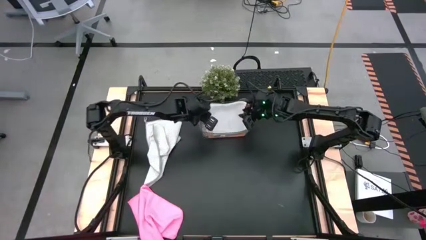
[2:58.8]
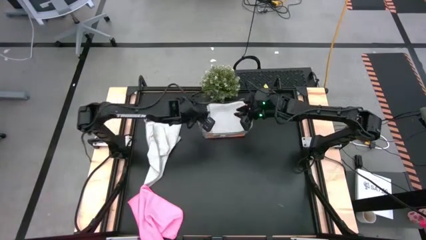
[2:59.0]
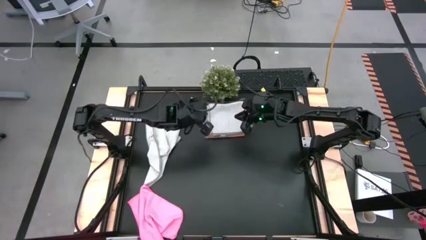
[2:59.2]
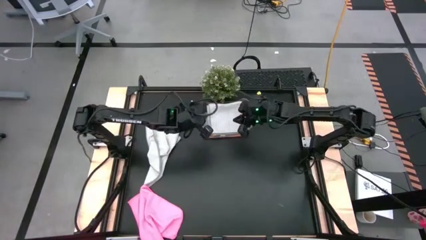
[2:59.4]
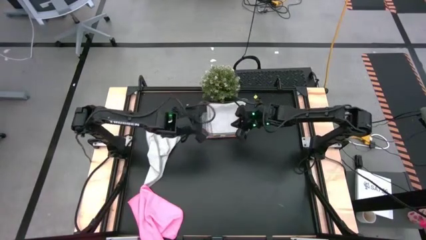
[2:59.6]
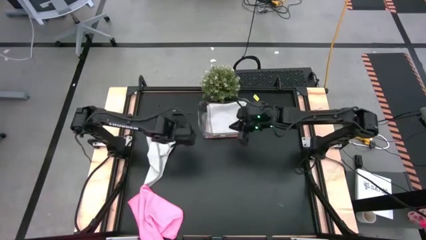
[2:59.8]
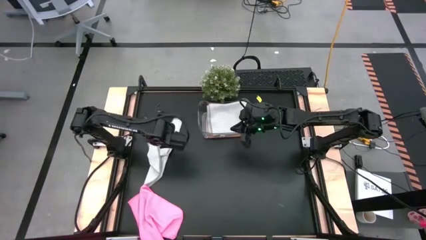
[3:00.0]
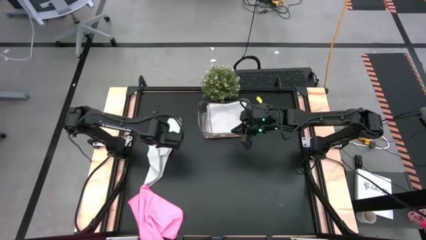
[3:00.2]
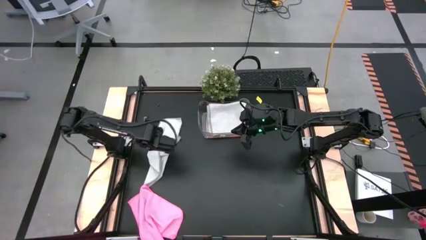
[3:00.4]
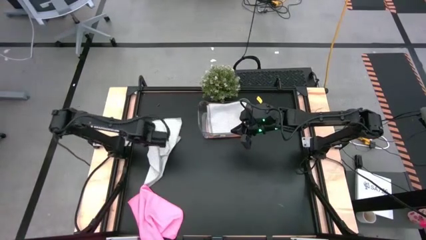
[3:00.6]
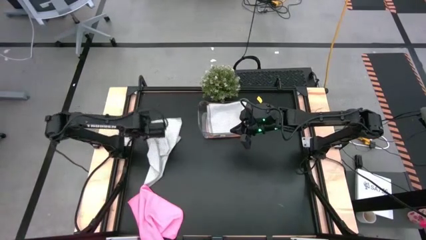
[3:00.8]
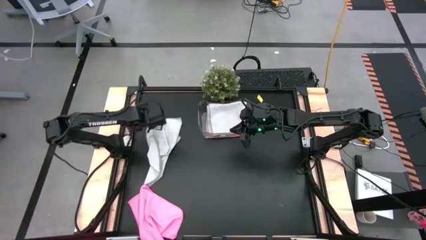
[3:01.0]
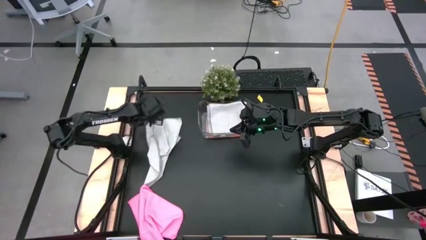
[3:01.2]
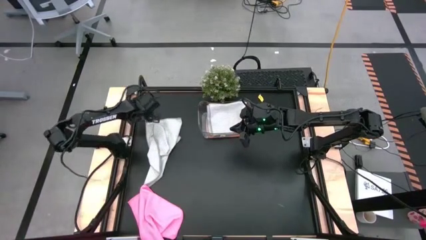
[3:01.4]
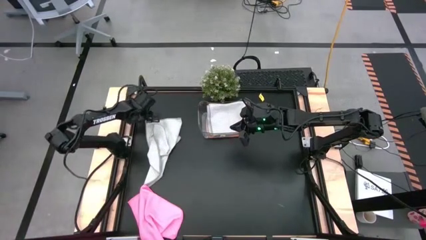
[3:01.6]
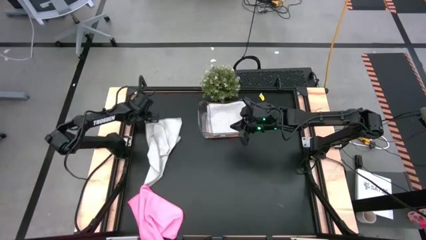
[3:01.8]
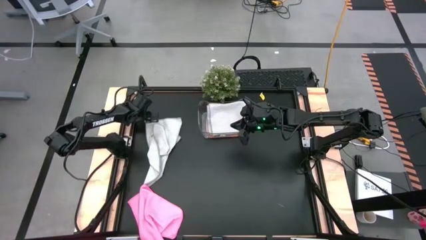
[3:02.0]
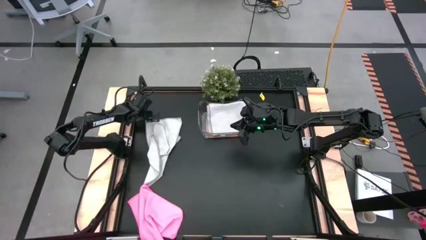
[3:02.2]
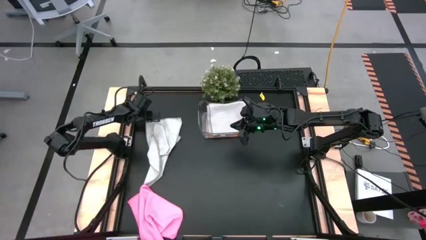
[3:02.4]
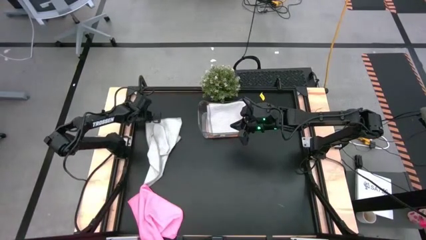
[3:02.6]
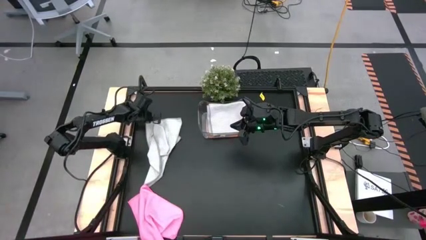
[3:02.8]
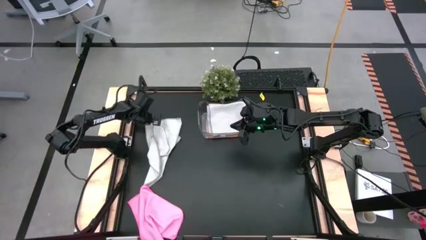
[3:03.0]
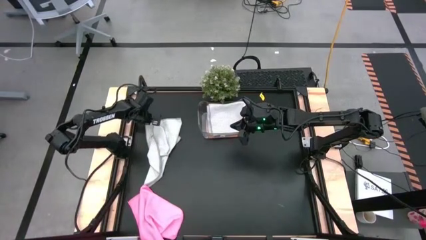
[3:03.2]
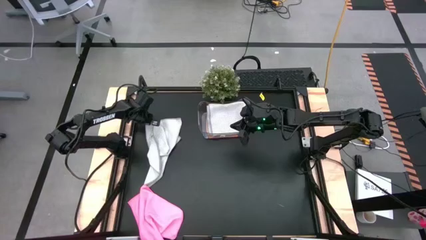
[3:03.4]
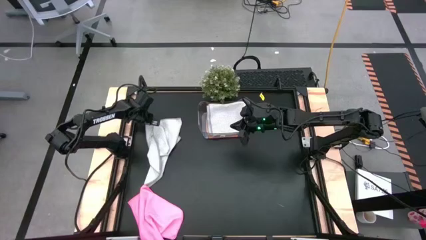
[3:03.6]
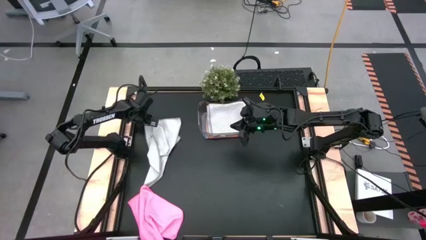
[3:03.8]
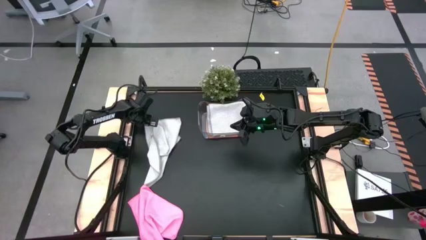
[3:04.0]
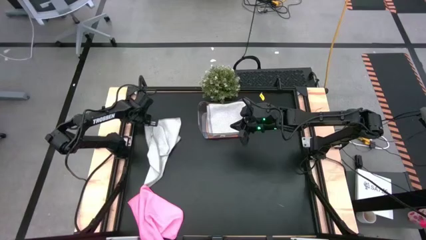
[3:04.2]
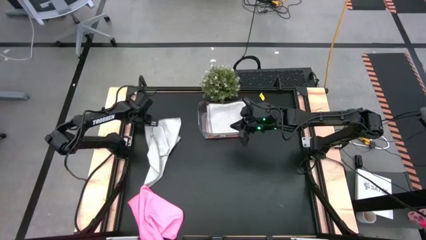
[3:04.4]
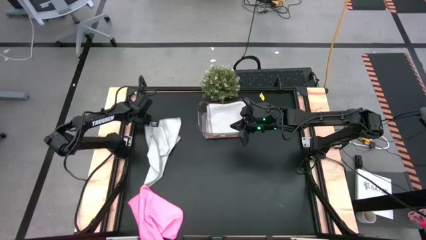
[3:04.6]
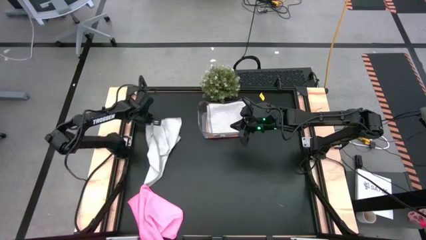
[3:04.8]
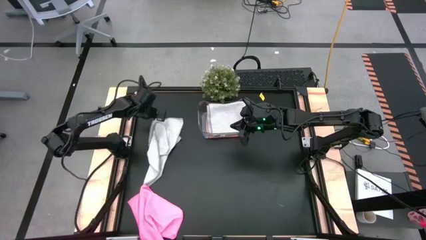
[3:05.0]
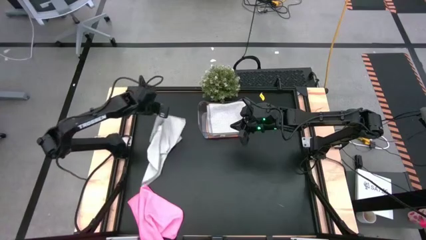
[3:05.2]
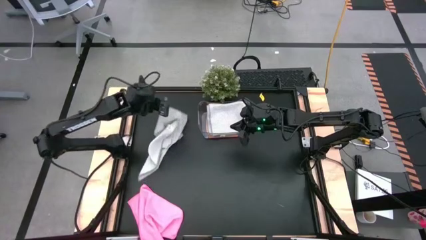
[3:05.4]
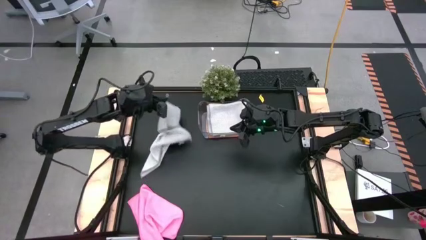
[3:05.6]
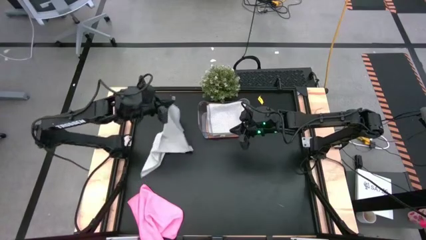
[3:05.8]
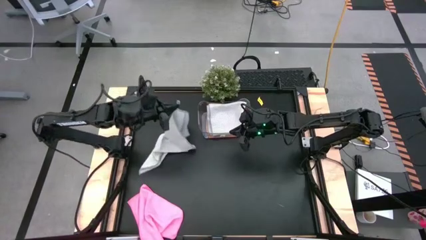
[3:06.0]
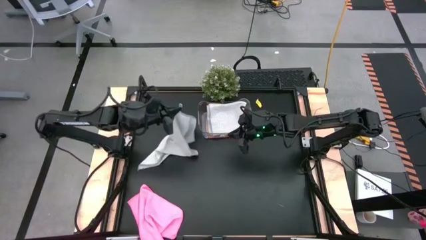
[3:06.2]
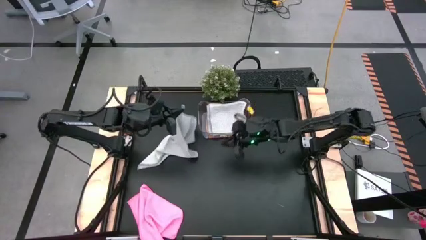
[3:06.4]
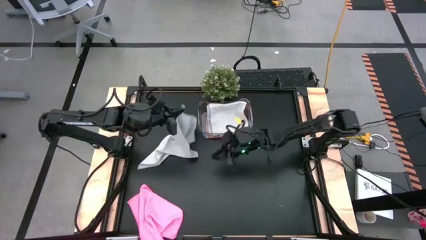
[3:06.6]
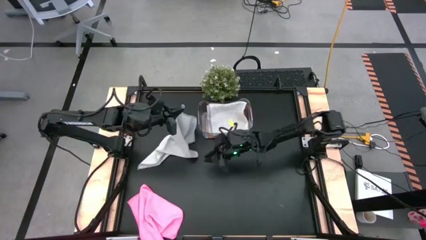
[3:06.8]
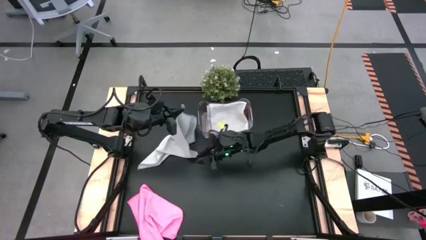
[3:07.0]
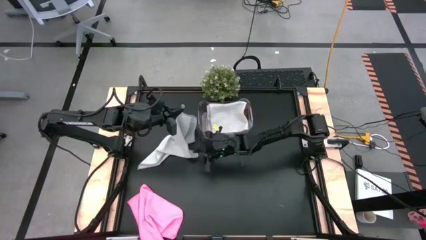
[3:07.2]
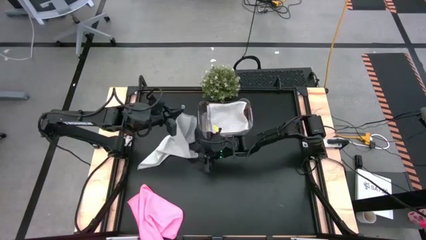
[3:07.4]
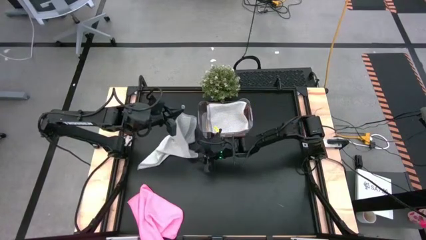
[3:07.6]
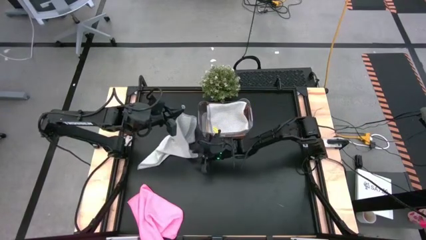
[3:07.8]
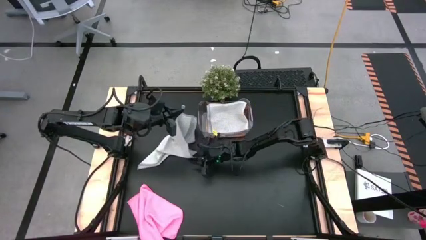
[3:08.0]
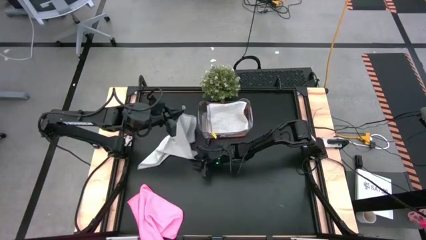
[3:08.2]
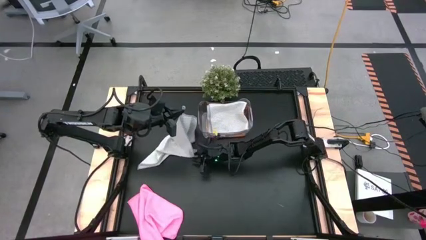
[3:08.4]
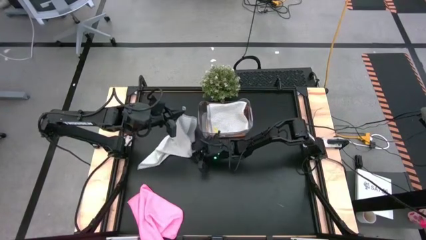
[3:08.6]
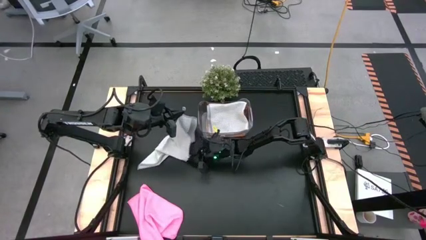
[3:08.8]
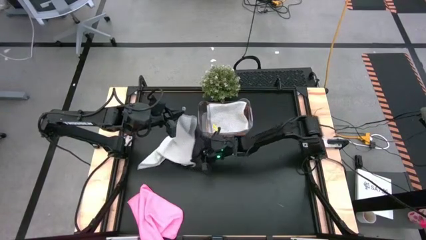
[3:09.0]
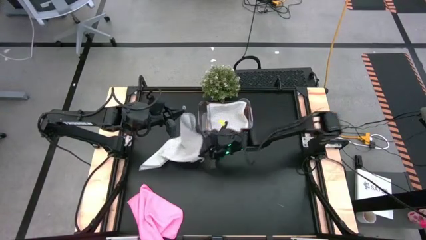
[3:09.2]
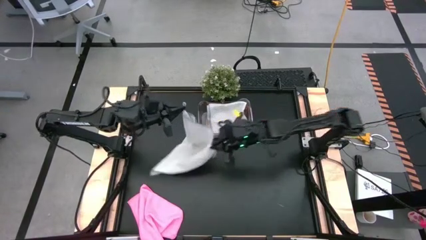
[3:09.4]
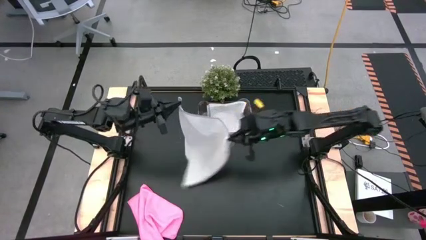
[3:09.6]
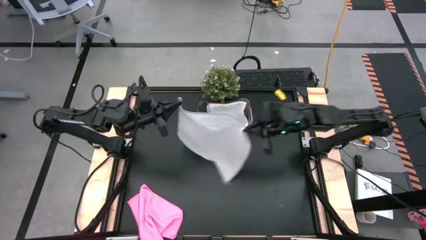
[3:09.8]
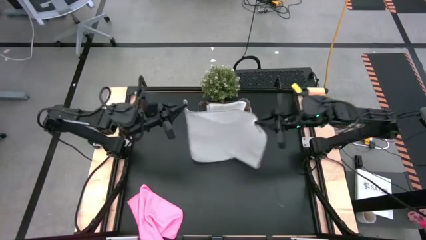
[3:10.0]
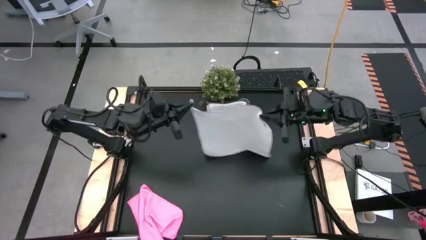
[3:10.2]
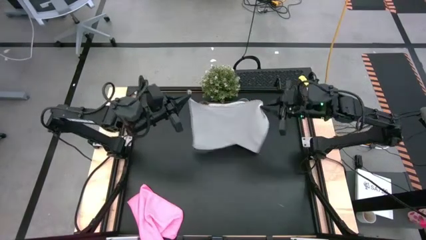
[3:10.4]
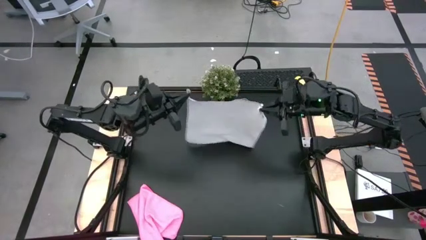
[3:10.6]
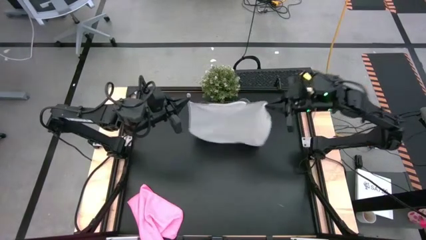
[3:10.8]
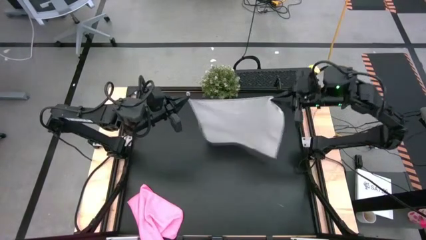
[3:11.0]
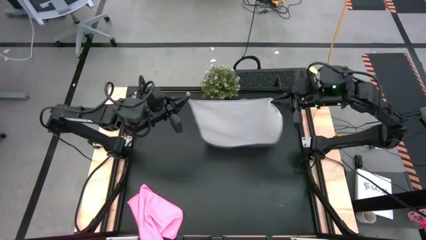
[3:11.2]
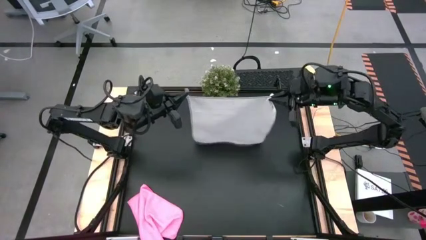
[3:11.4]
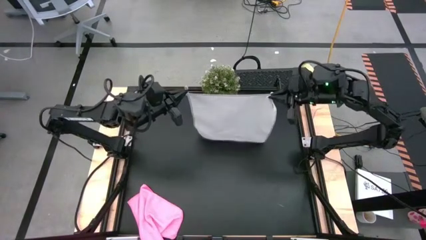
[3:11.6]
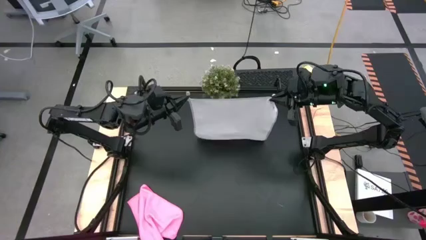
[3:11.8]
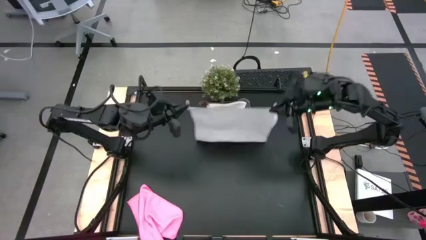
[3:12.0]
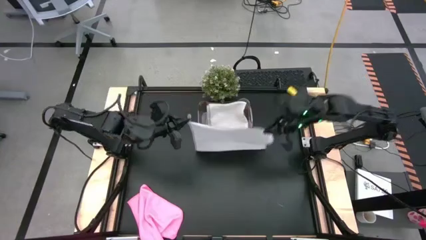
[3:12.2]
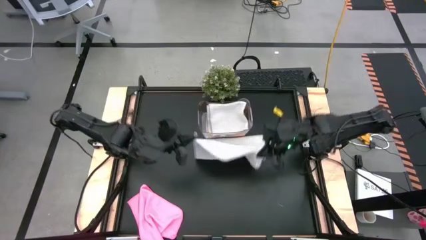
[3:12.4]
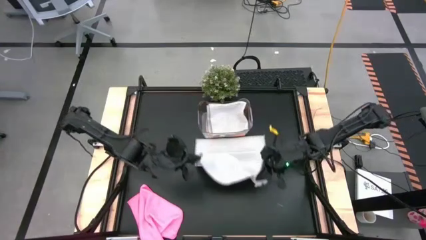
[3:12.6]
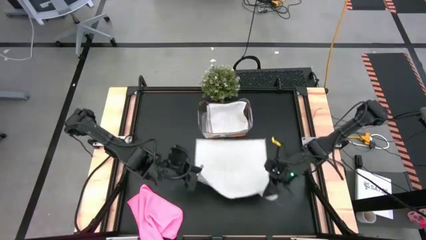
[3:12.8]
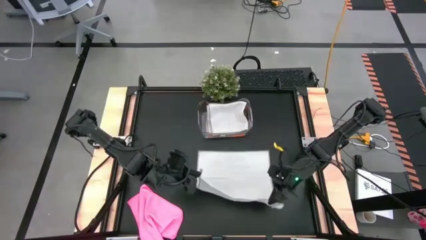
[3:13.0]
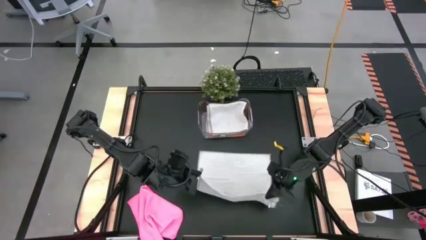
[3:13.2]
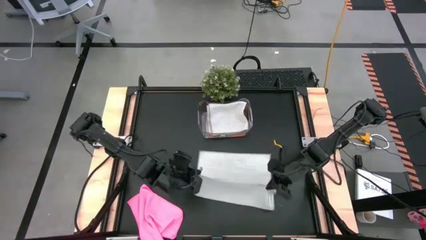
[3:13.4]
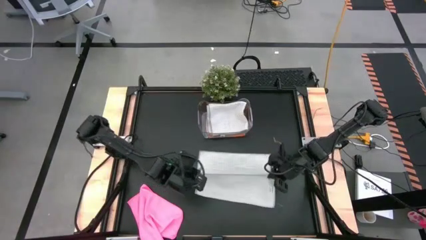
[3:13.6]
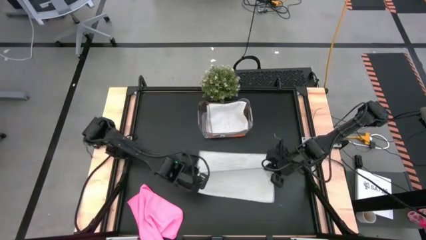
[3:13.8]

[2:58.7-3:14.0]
Task: Fold microfiber towels
Fold the gray microfiber towel on the table
